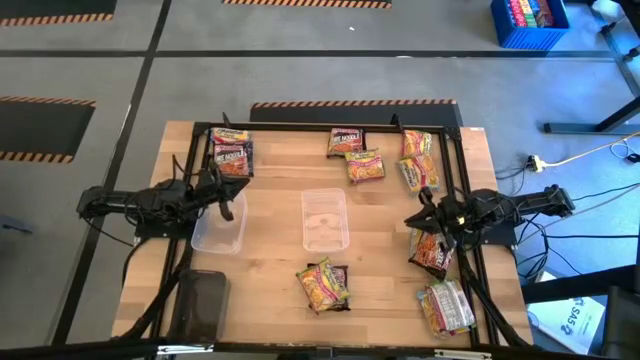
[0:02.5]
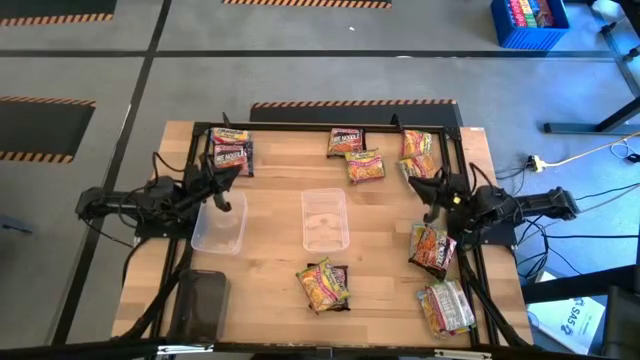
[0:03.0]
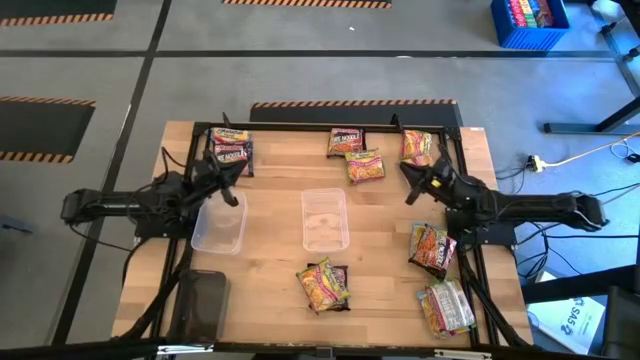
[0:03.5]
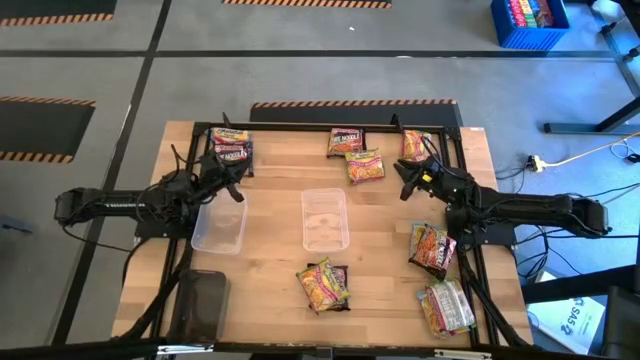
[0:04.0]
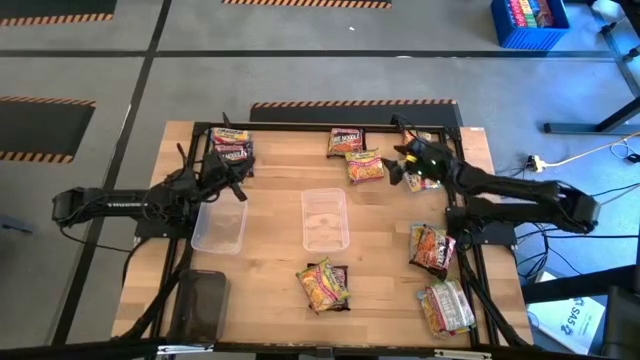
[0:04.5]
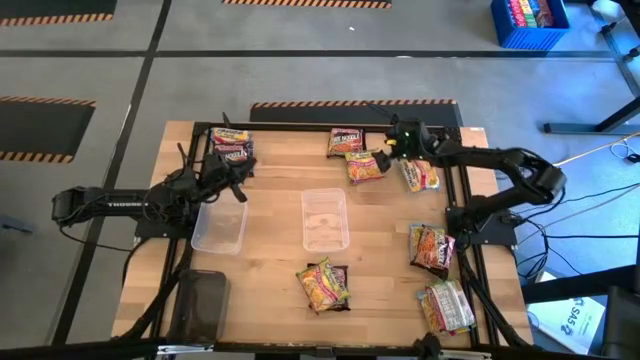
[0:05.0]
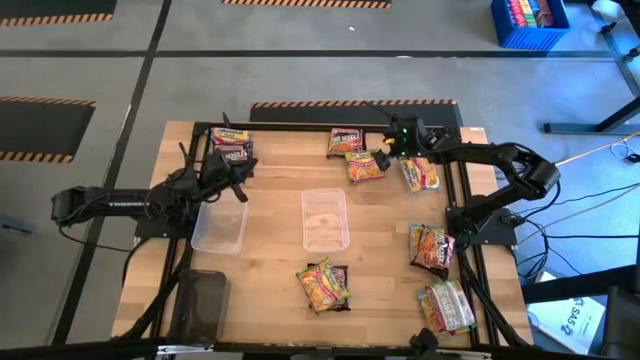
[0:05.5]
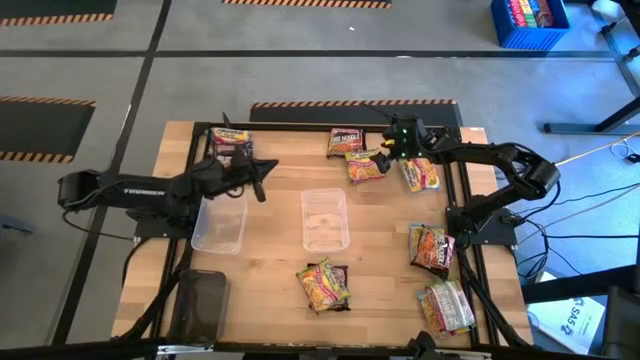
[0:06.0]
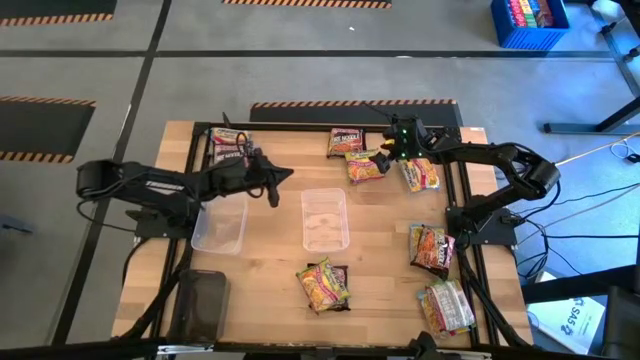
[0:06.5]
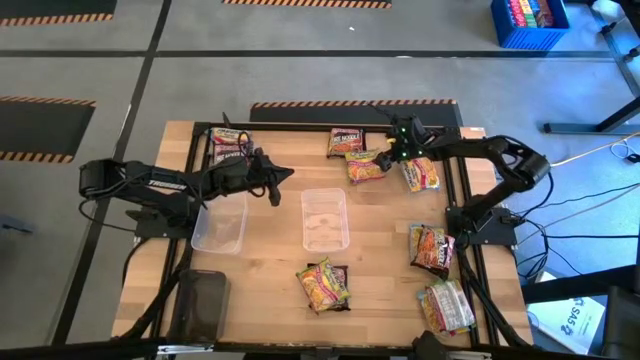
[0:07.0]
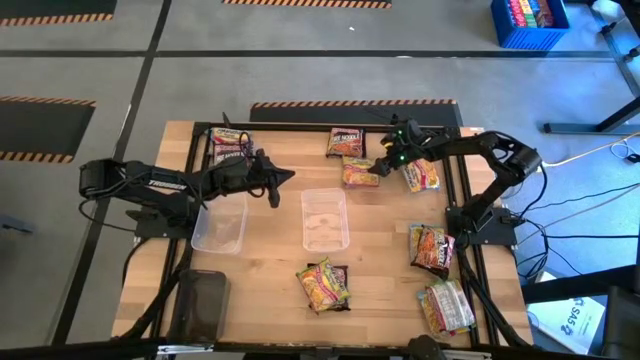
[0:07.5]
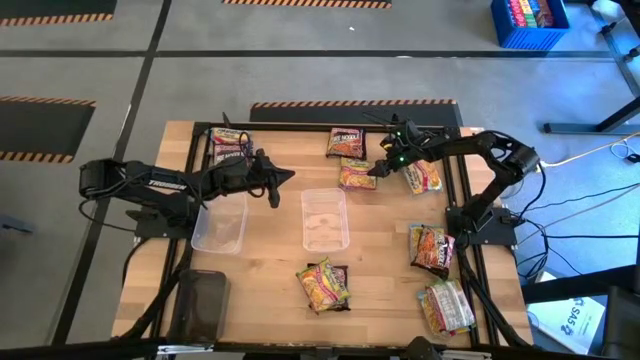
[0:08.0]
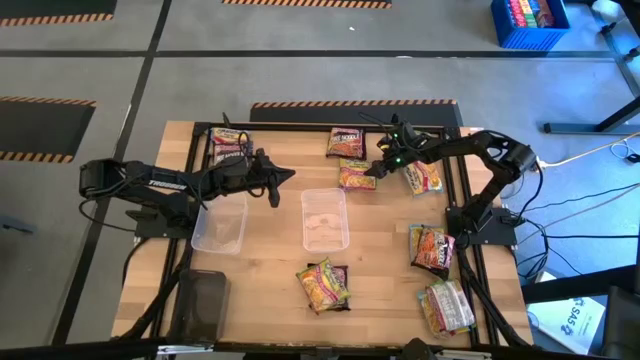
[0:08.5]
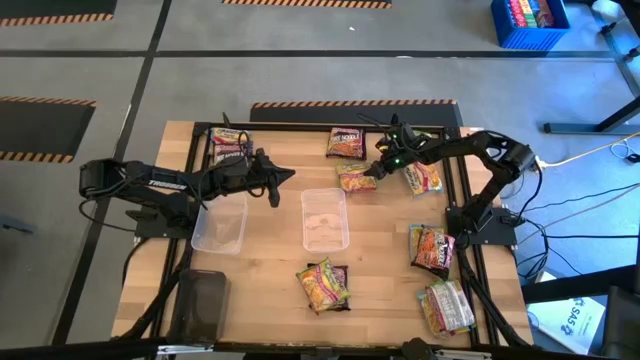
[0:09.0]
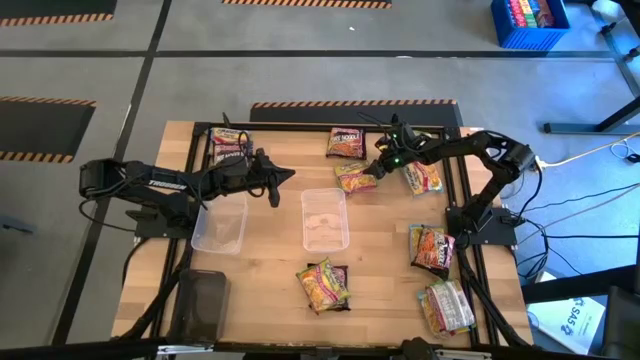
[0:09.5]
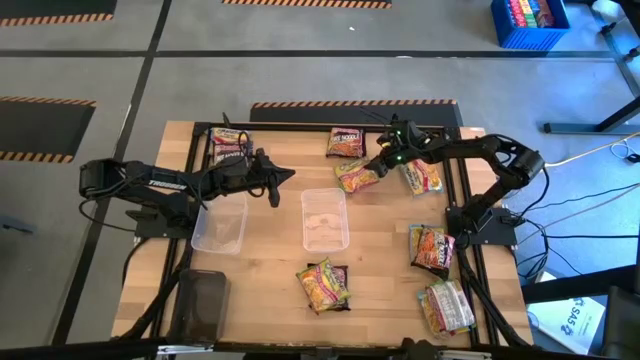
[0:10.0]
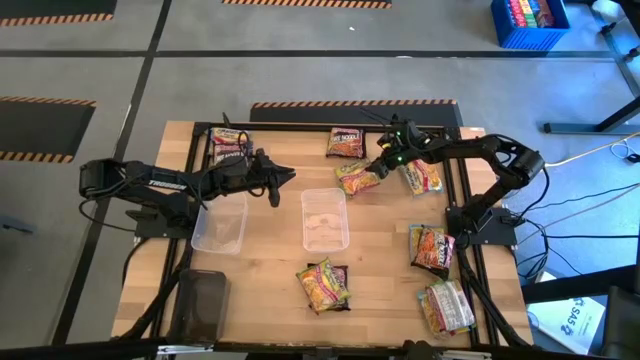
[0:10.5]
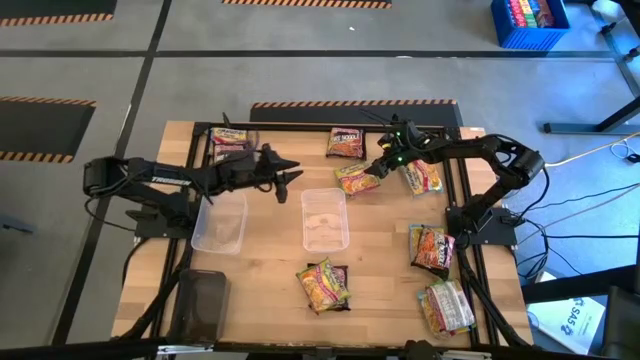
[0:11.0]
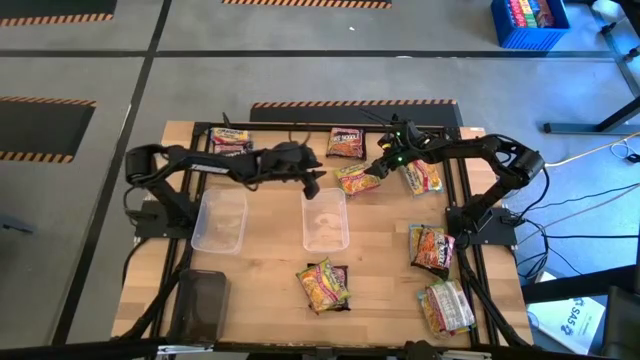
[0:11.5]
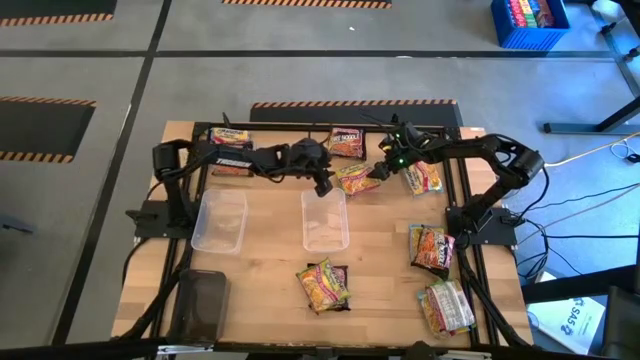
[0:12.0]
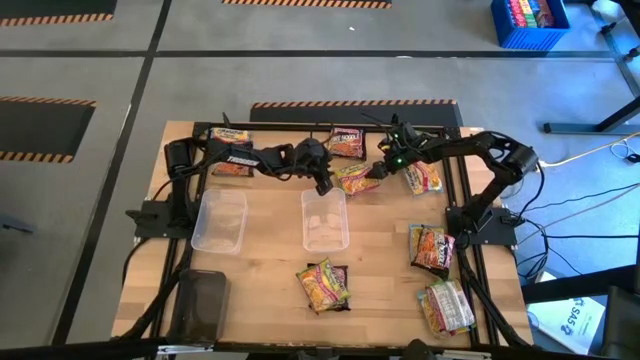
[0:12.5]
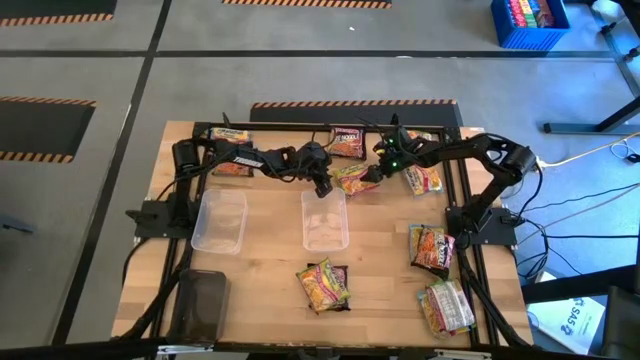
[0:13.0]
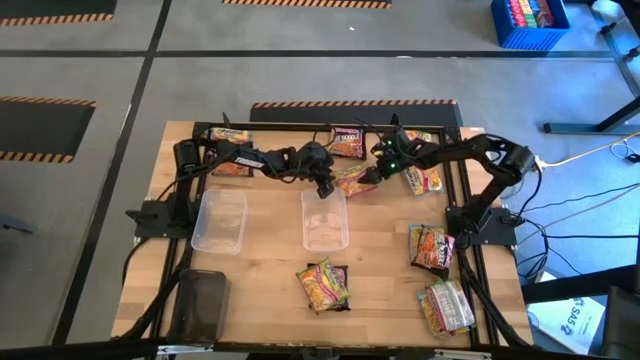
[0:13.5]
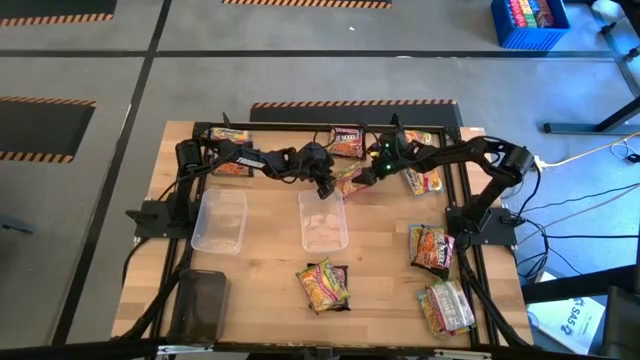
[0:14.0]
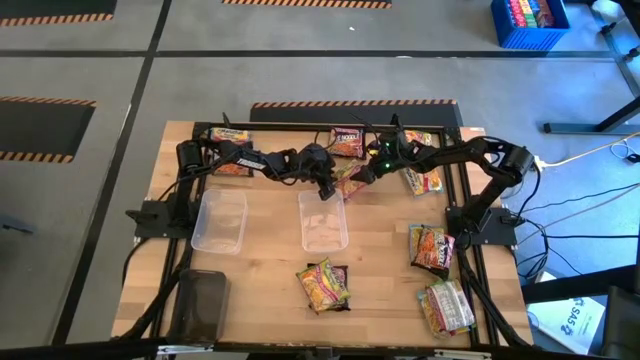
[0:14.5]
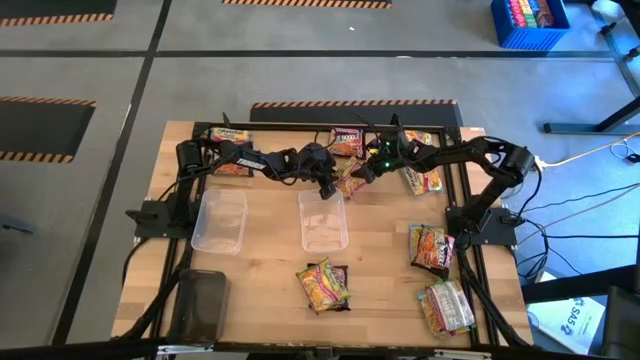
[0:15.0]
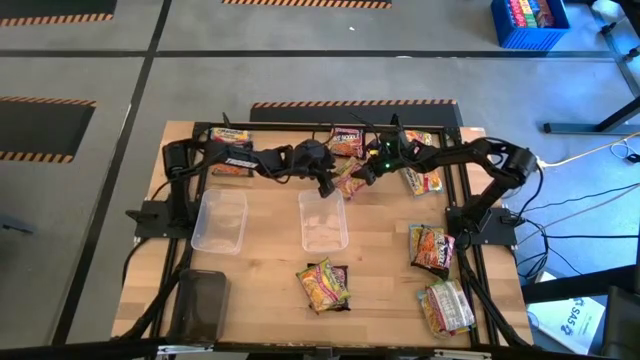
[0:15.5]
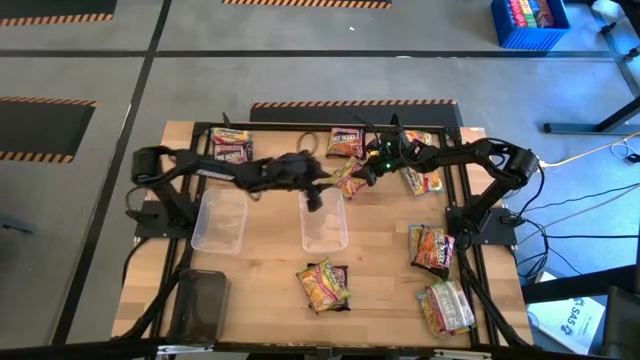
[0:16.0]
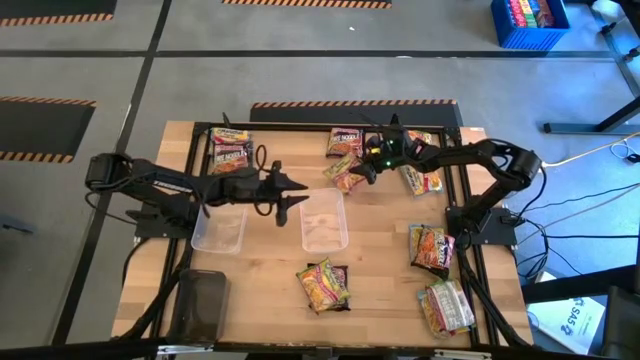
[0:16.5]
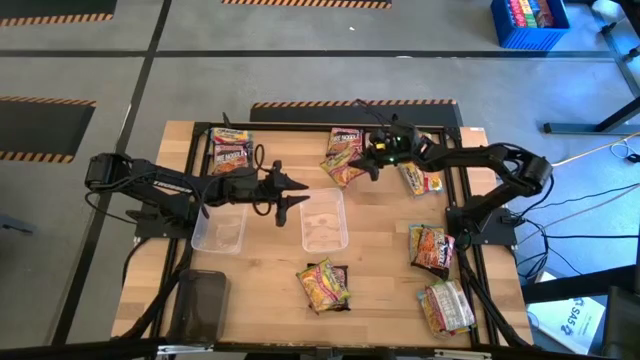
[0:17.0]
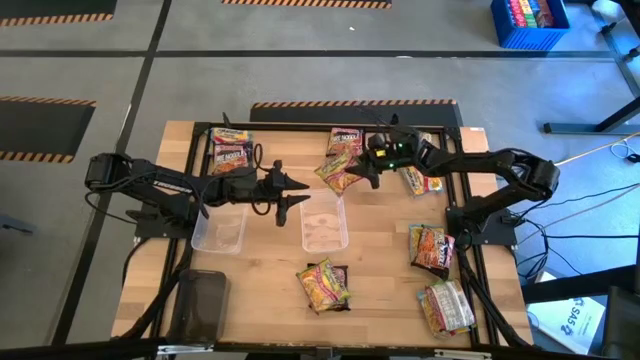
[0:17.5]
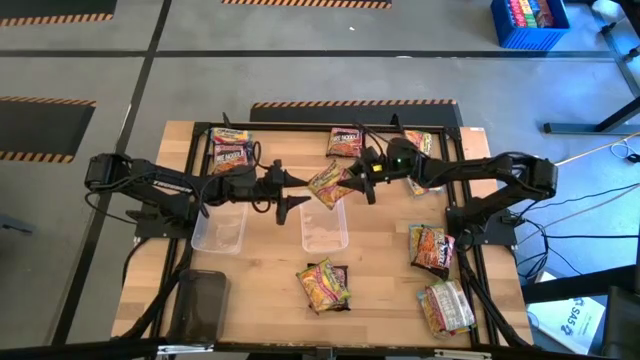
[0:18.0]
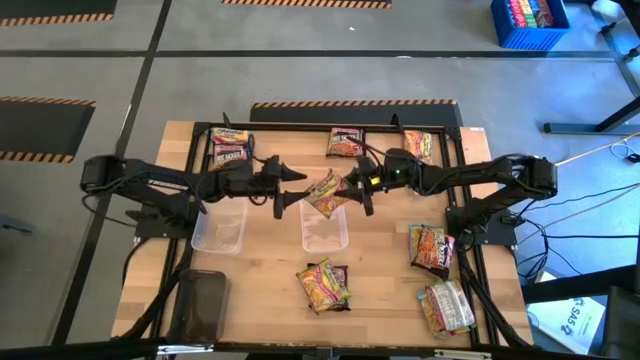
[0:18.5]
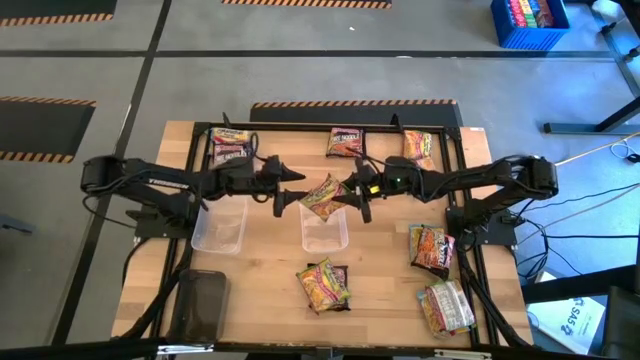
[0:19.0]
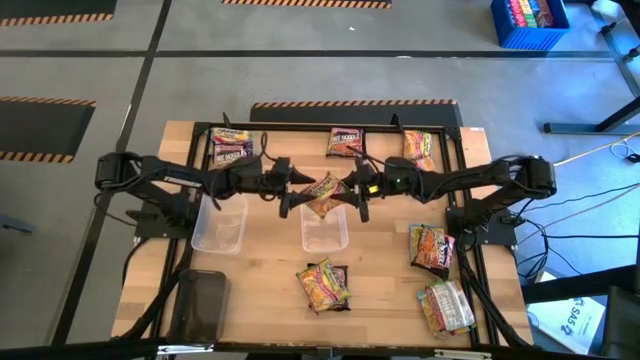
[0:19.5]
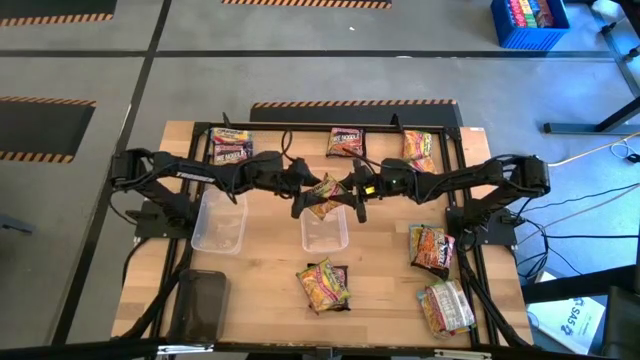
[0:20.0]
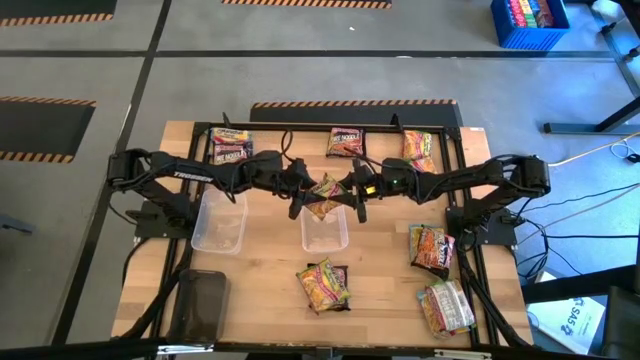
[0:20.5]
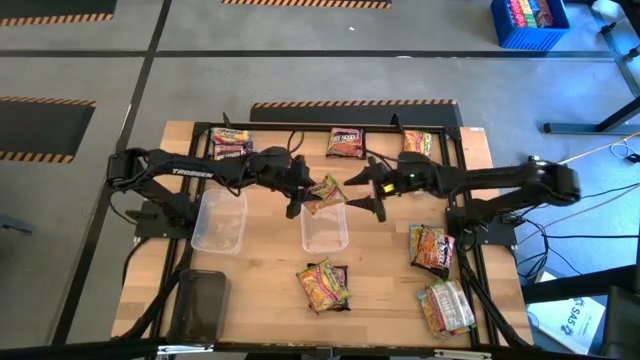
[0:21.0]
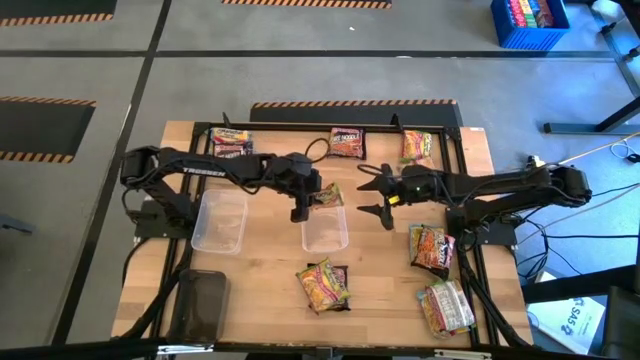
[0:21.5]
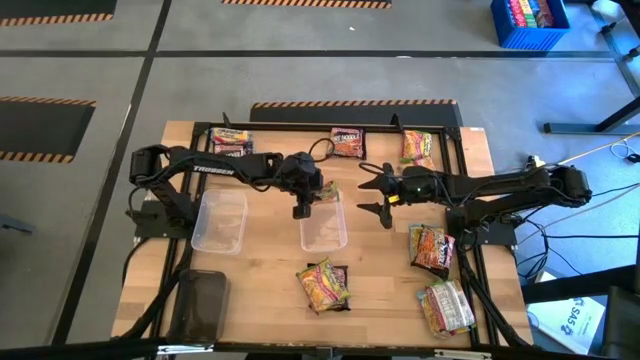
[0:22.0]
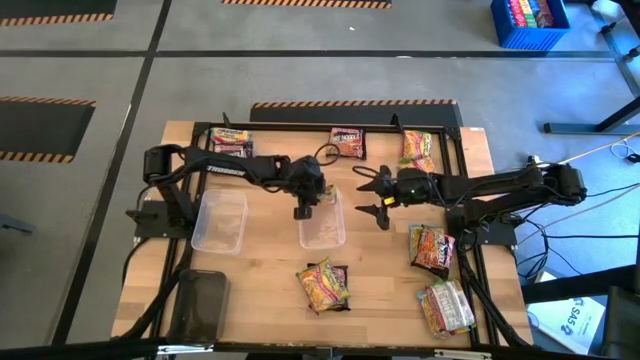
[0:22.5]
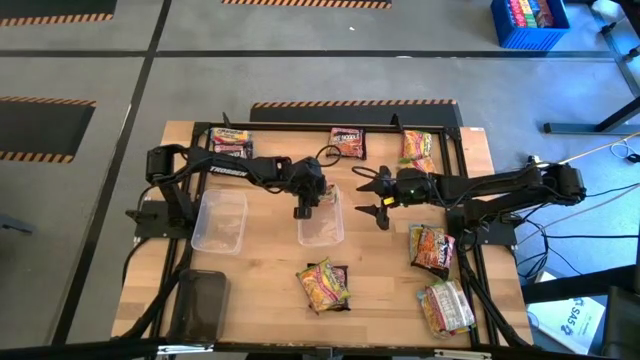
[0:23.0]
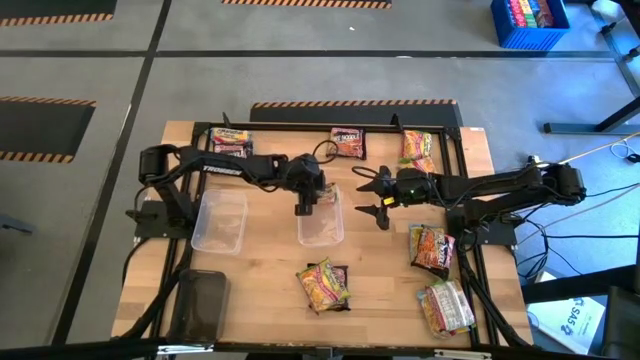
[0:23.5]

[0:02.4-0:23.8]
Task: Sort Maruchan noodles
Put the green noodle pack into the right transparent bin
